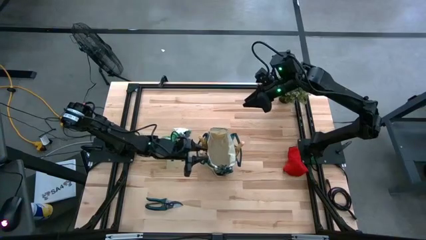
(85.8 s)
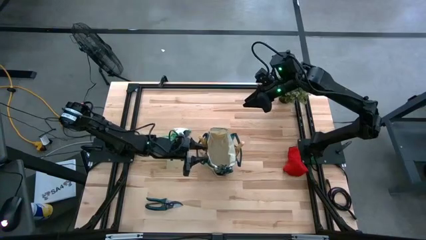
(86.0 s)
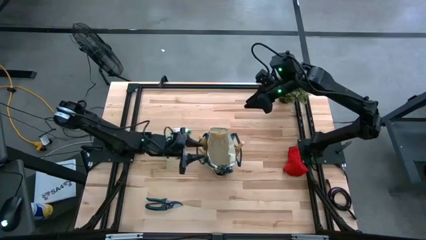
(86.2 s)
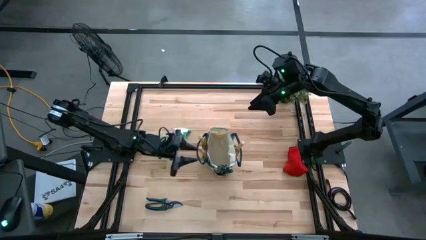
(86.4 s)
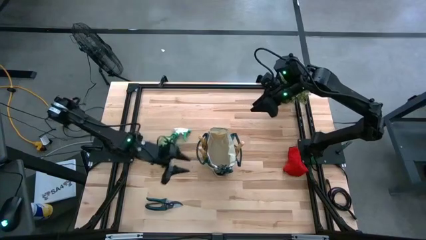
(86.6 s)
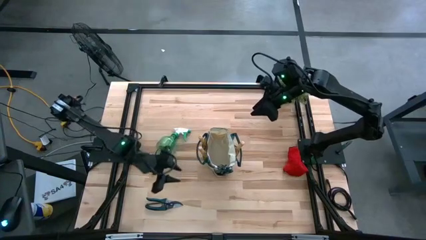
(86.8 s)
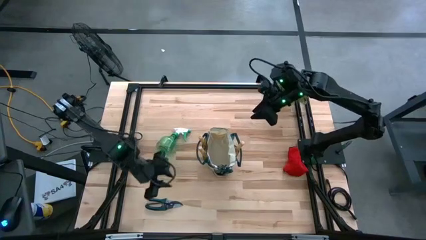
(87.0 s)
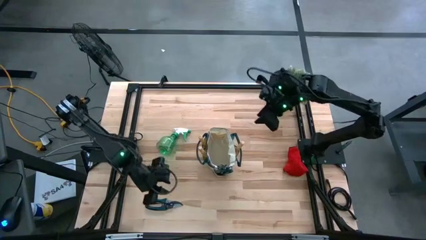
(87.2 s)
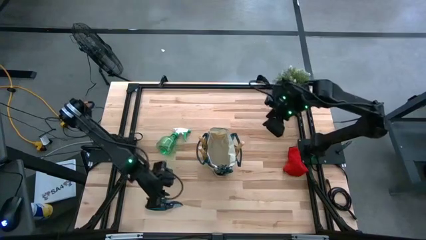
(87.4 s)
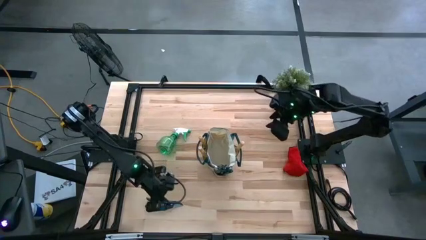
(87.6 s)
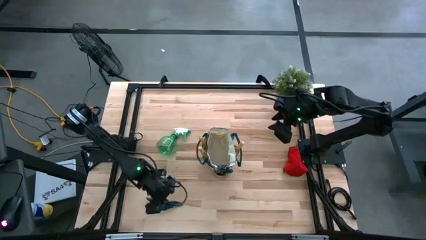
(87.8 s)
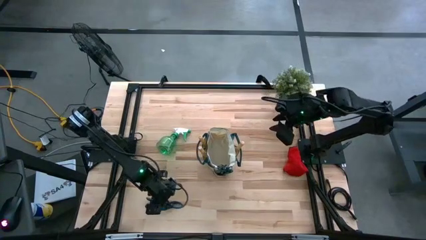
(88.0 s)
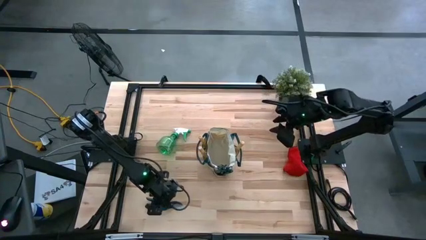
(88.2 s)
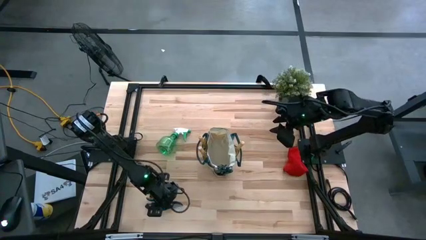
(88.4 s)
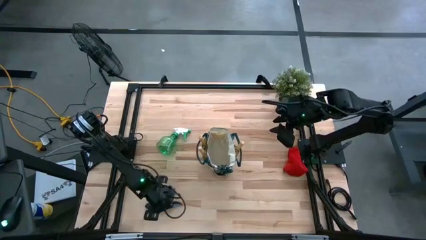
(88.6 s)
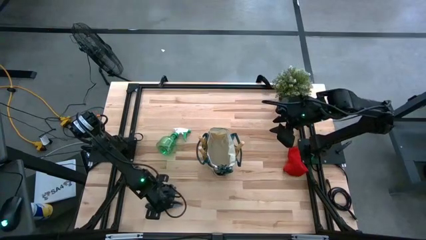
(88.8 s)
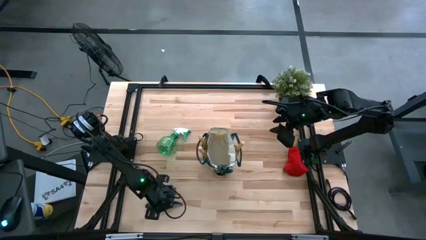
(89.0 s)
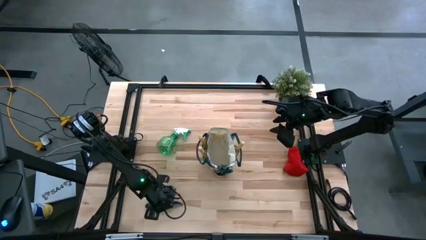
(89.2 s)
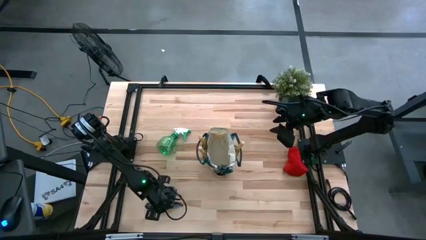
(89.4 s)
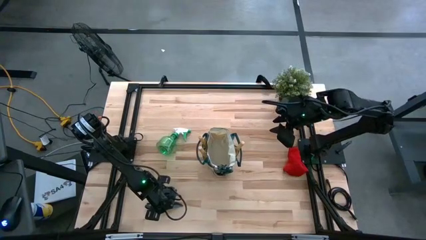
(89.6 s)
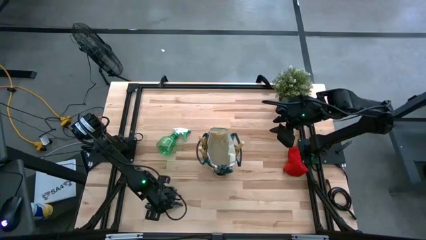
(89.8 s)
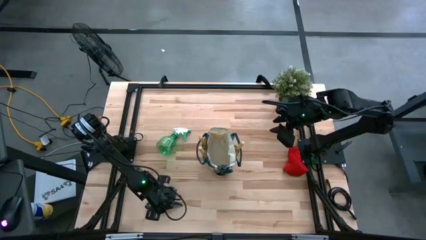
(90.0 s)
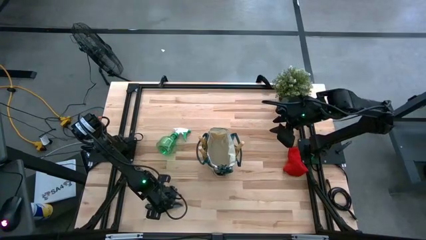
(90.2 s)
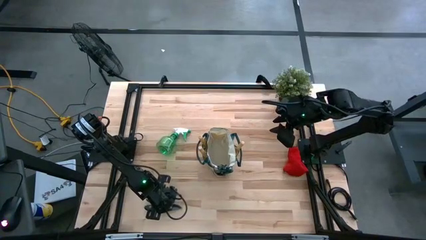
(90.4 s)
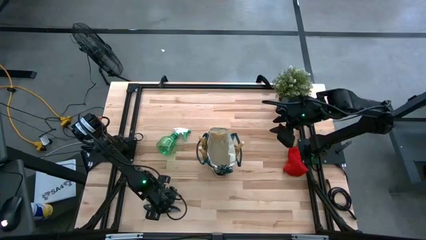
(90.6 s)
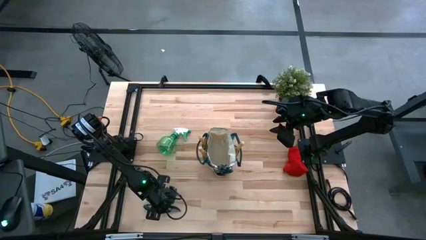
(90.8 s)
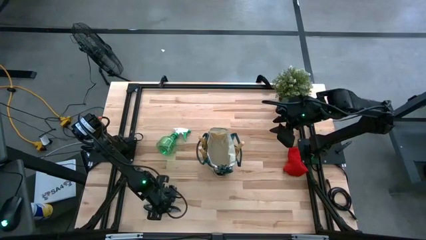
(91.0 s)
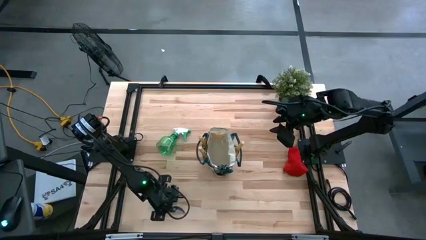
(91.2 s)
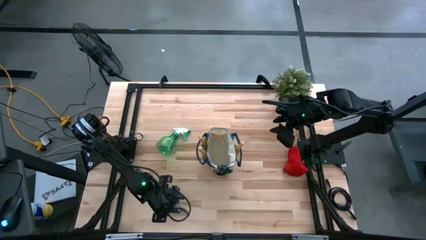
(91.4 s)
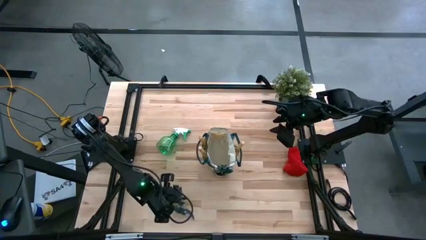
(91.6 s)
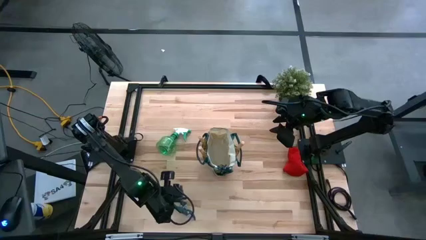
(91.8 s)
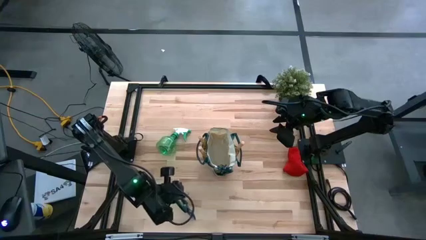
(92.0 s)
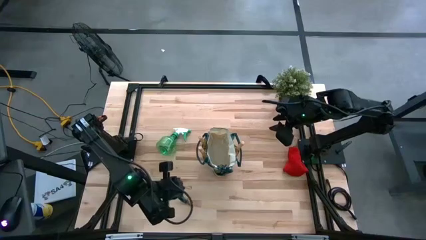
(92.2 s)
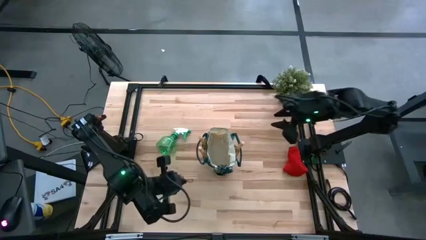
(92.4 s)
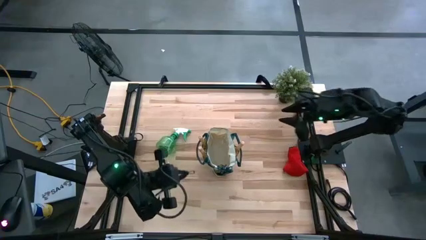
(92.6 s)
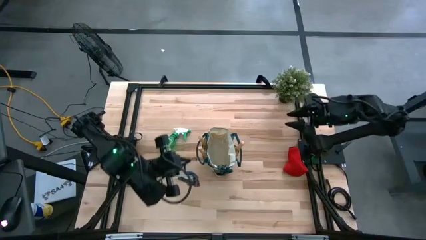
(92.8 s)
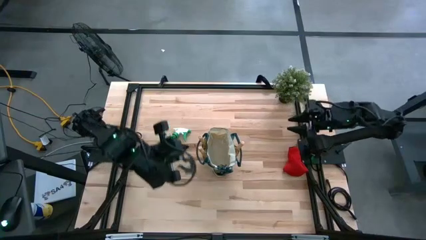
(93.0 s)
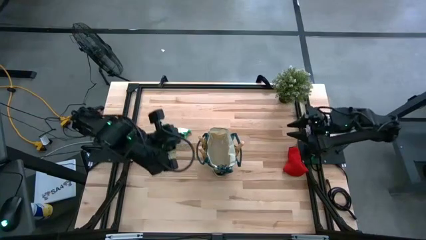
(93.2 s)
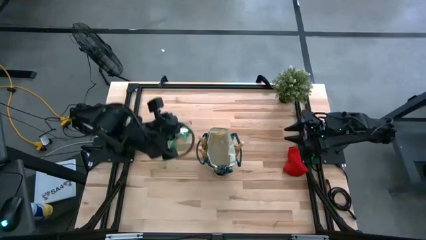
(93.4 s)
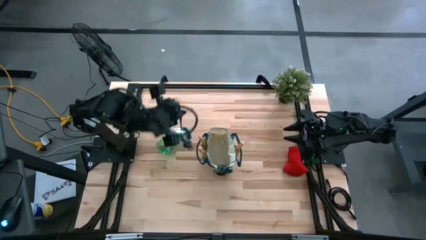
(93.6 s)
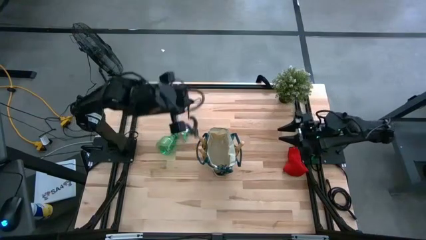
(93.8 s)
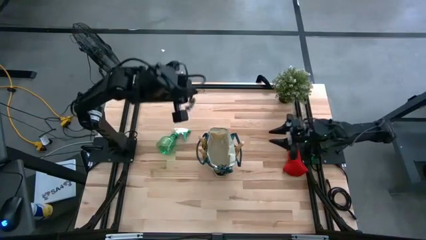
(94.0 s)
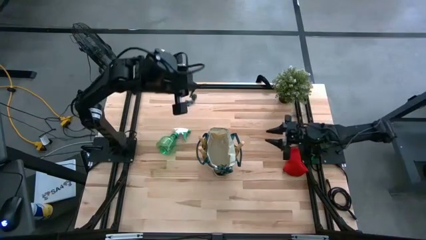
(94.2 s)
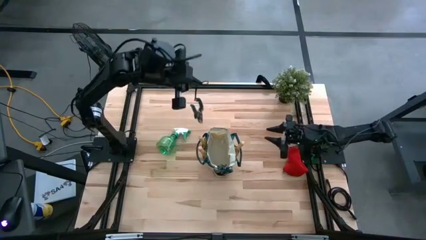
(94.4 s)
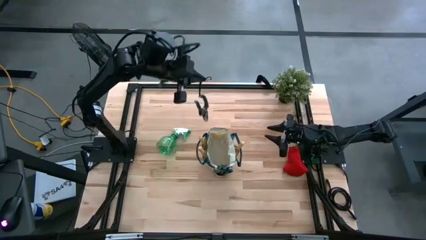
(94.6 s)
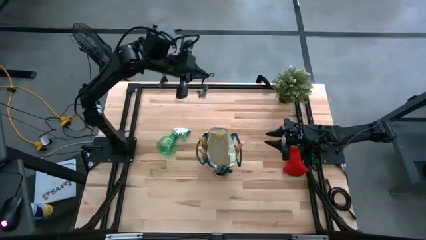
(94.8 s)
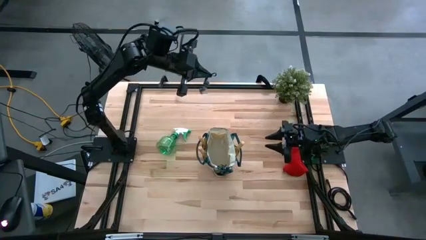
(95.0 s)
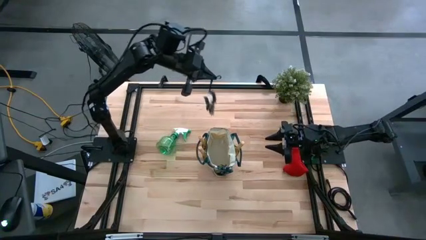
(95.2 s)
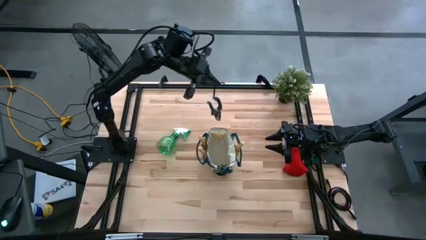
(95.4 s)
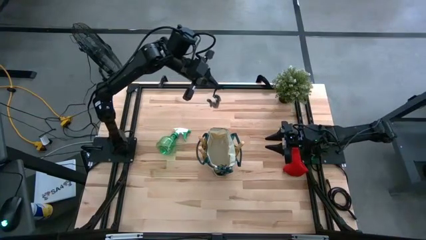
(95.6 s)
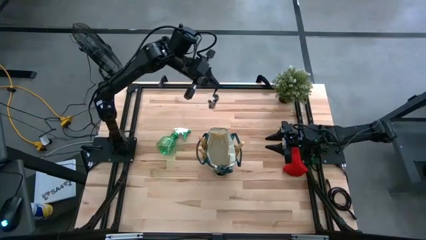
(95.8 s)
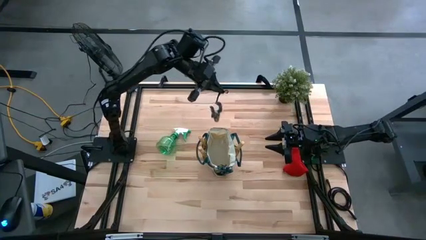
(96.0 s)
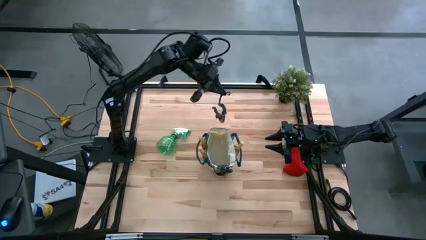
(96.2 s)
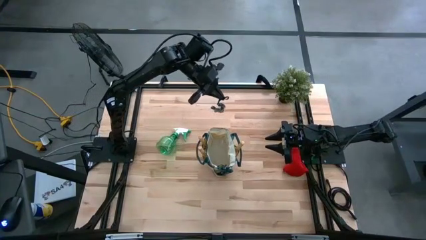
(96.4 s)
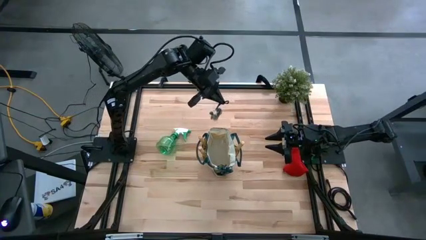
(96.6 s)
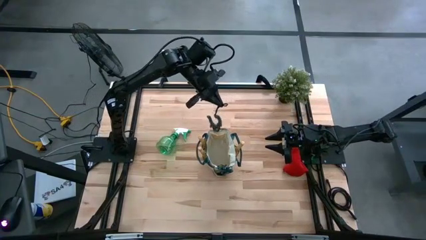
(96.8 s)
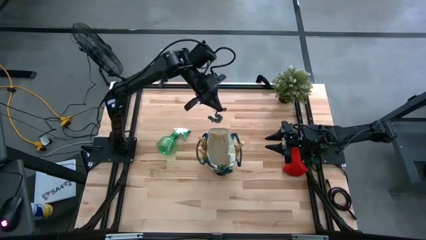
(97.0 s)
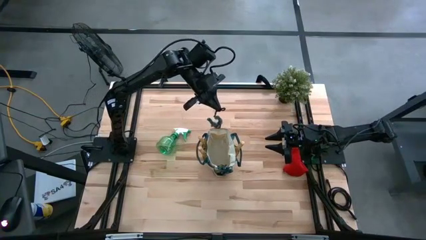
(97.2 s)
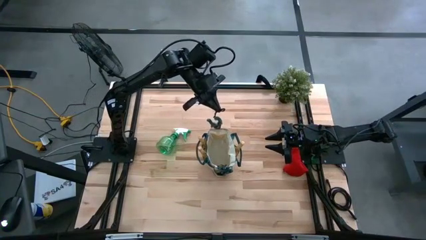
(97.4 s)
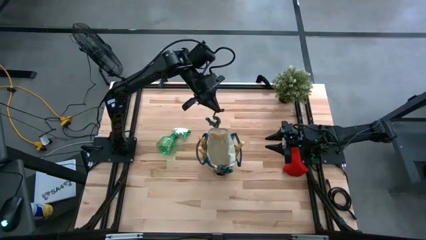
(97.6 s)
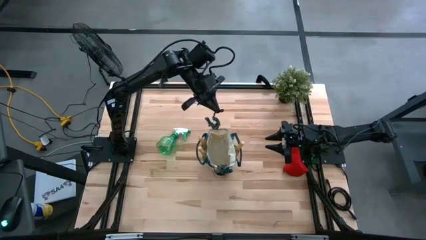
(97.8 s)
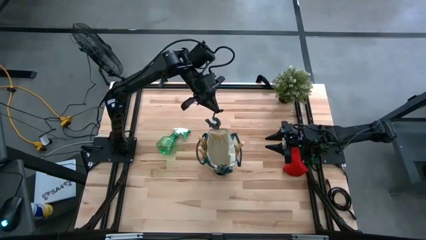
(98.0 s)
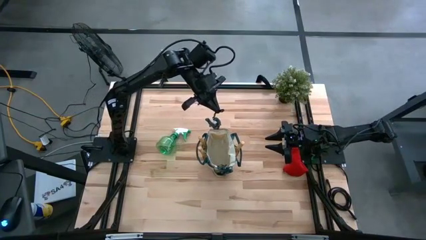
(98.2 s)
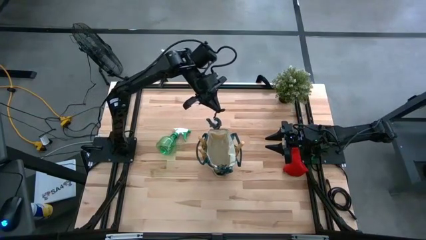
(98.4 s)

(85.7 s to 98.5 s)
Task: Pick & Place Garden tools in Gardening bag
Put the green shears into the white gardening bag
